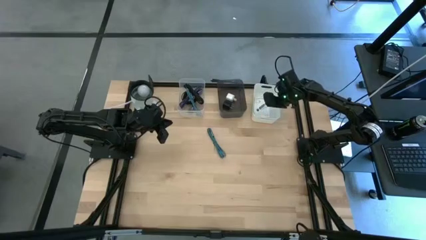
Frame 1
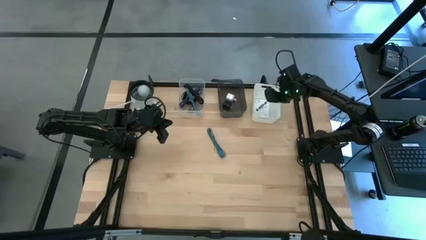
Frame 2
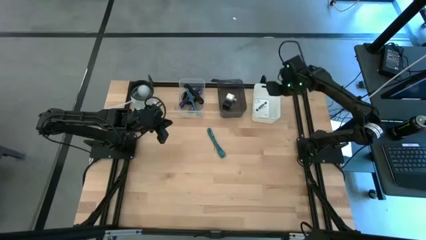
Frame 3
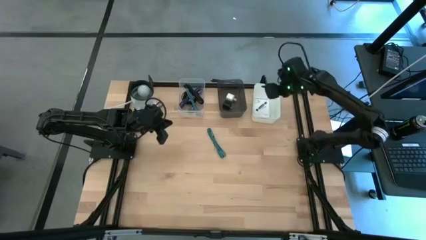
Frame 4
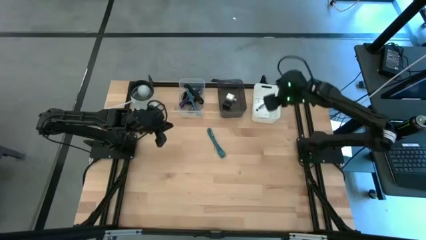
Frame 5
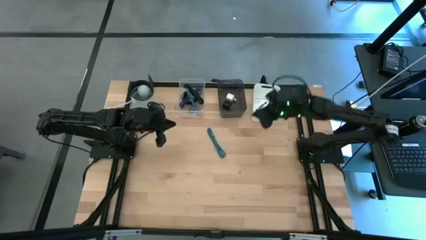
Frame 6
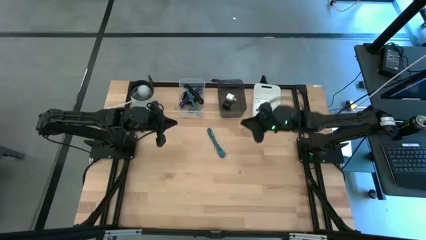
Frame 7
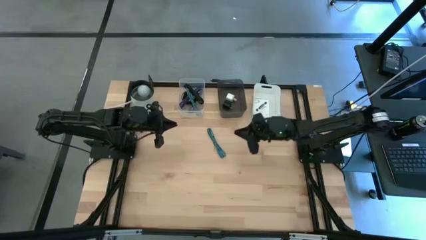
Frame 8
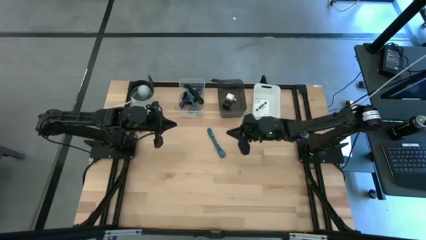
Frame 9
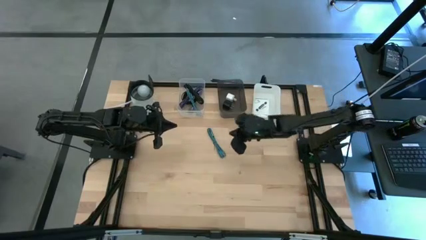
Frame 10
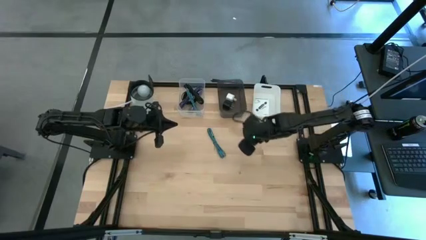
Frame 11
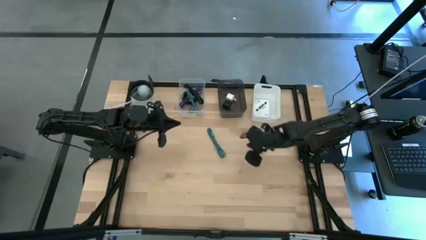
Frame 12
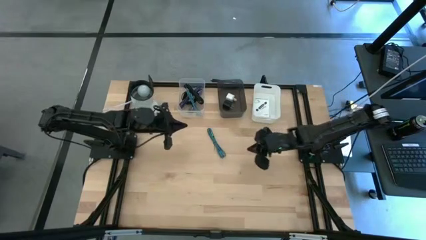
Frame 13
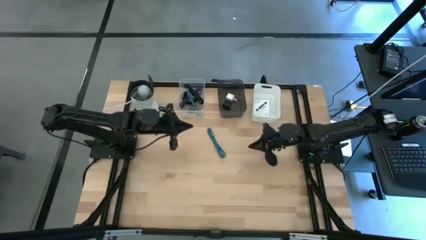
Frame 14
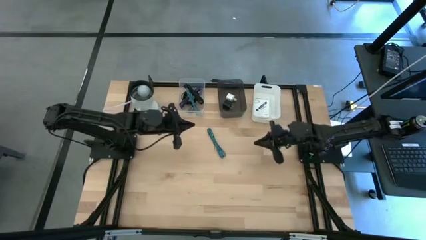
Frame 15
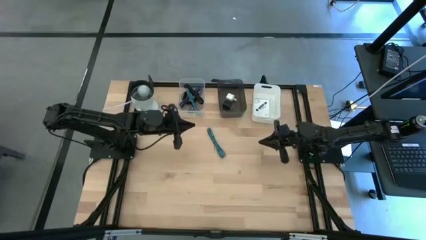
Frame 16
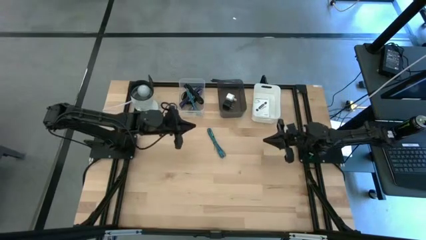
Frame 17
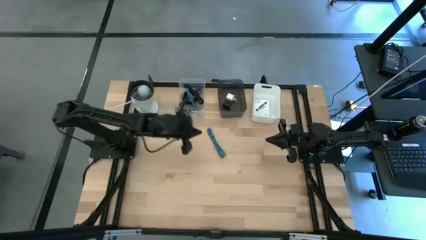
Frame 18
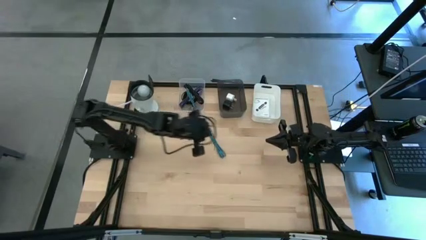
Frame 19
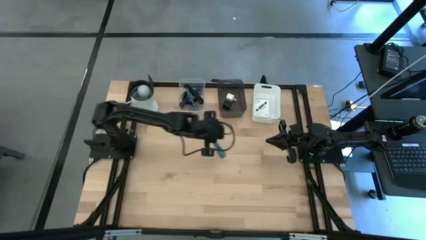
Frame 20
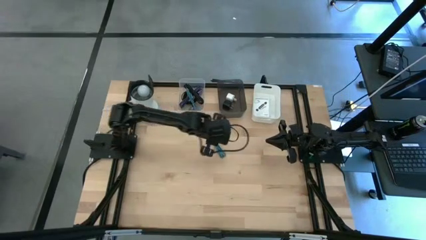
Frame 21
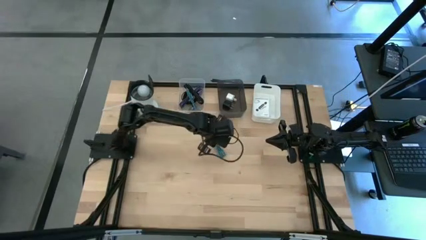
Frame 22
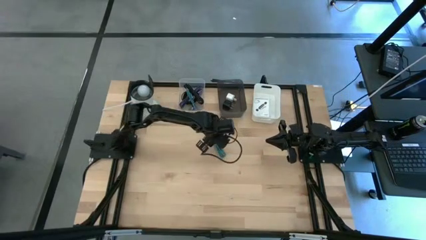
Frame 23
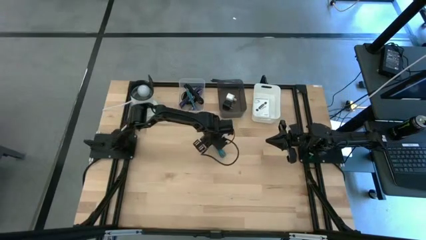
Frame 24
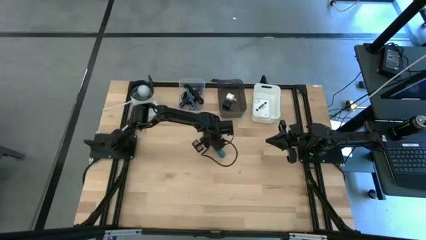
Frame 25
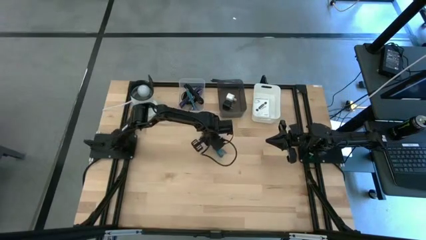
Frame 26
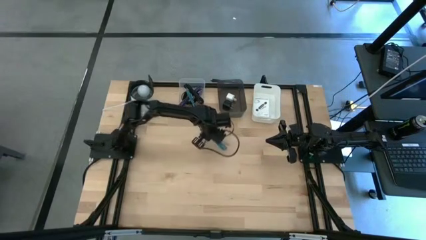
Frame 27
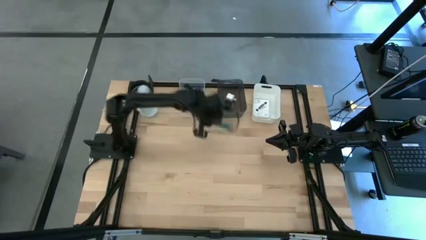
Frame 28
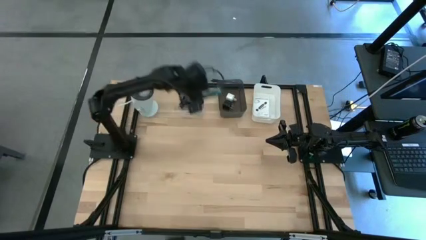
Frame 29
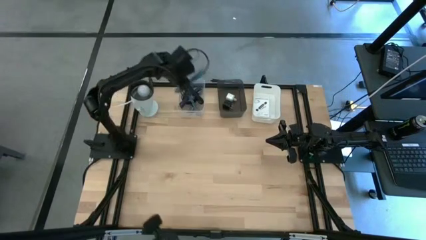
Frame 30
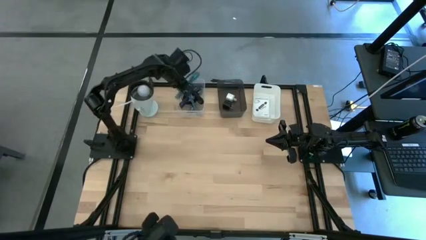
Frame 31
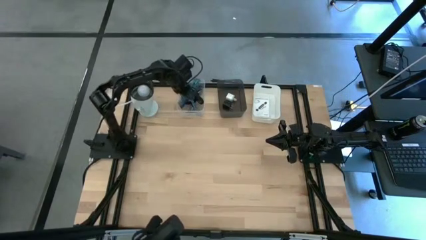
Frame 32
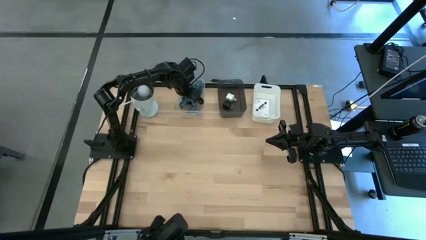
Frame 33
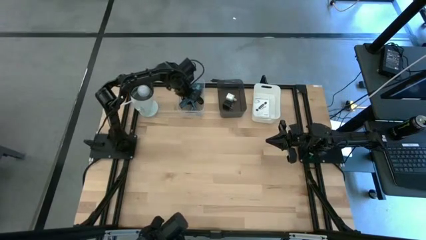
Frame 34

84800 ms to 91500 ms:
Task: Pick and place items into bin
Put the light blue charger cable into the transparent bin

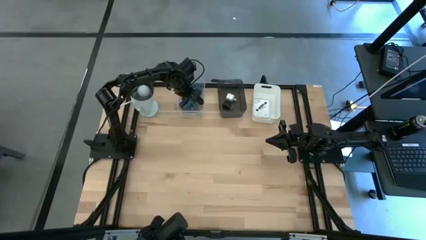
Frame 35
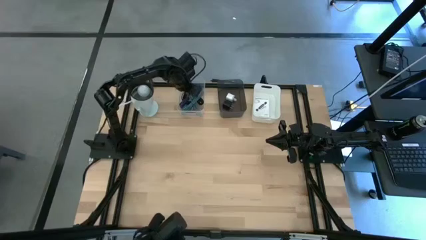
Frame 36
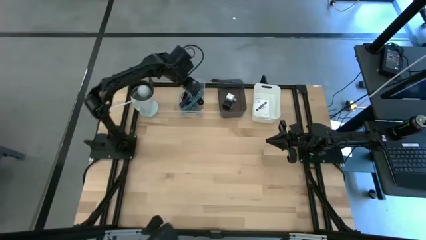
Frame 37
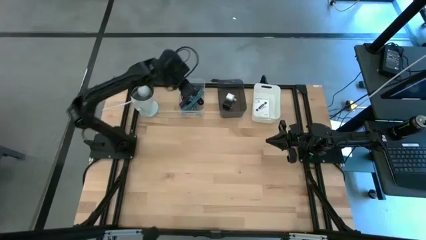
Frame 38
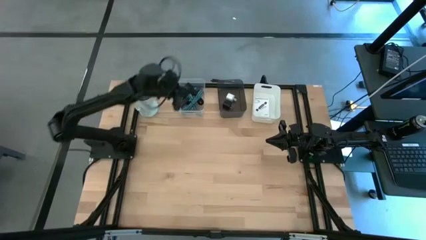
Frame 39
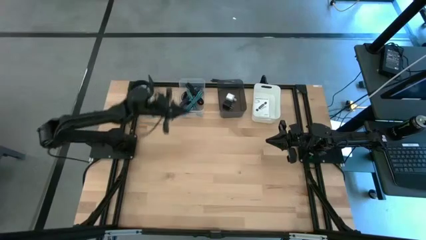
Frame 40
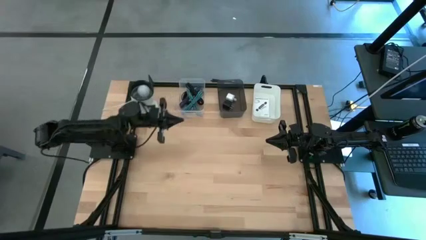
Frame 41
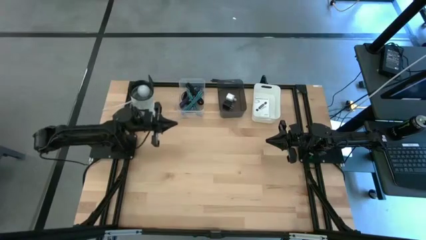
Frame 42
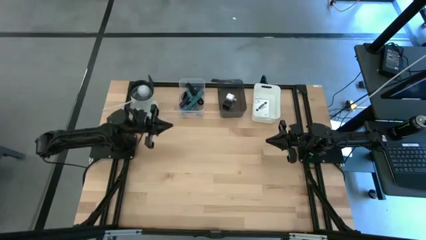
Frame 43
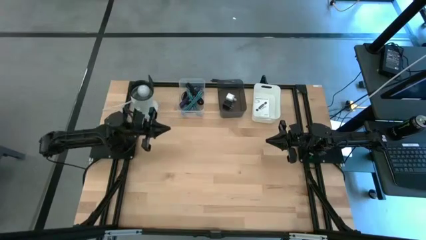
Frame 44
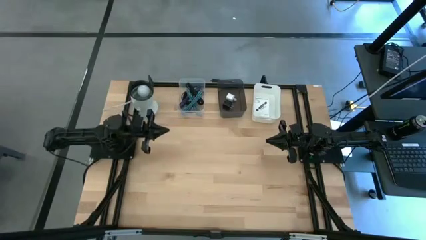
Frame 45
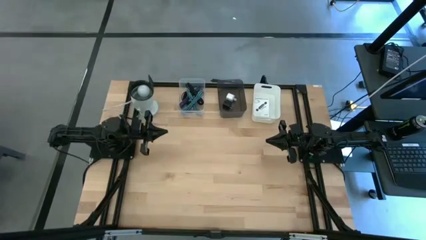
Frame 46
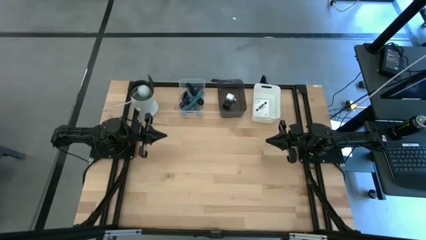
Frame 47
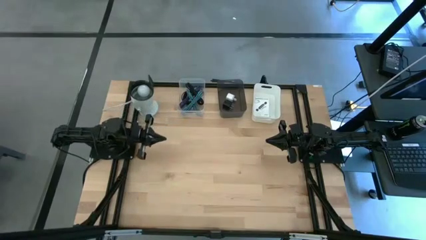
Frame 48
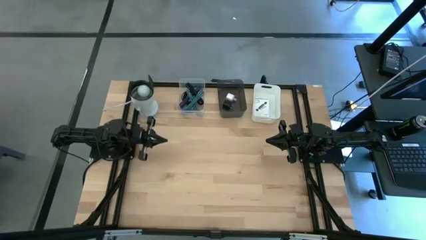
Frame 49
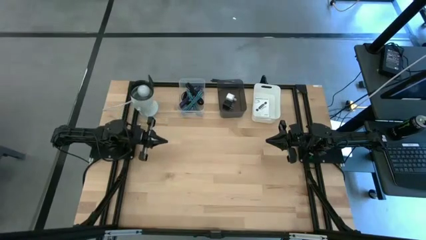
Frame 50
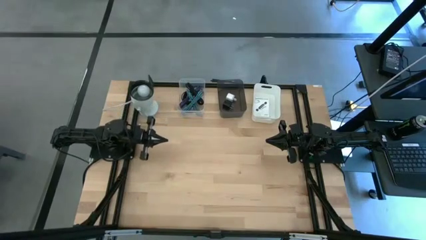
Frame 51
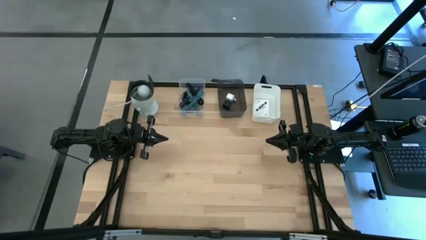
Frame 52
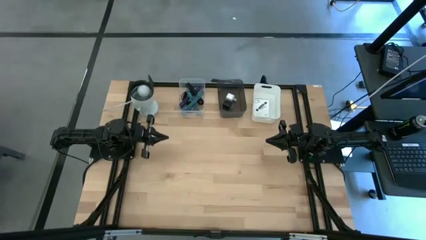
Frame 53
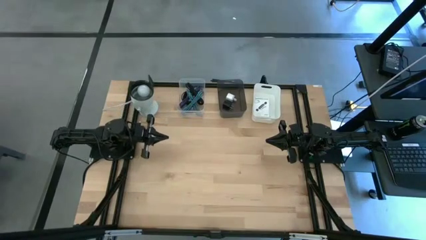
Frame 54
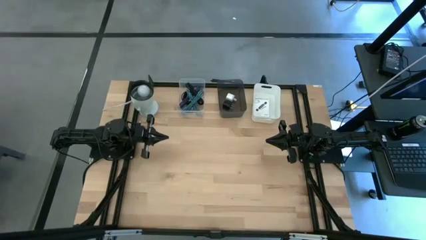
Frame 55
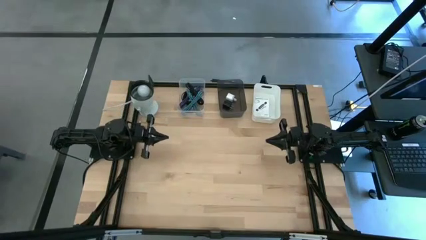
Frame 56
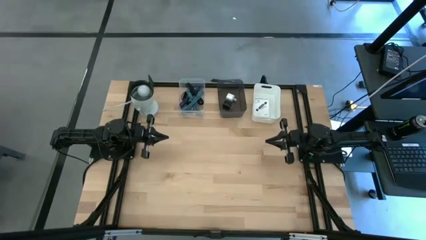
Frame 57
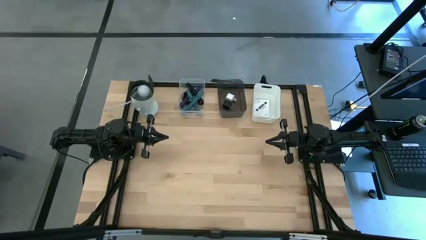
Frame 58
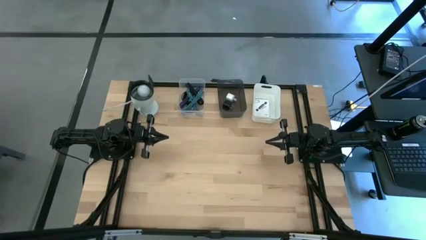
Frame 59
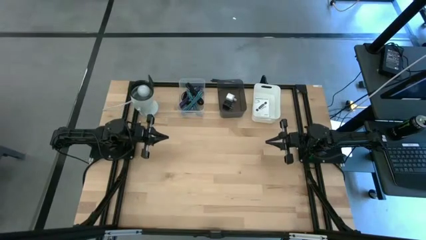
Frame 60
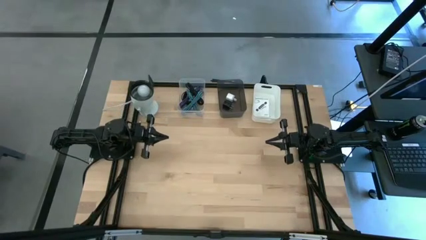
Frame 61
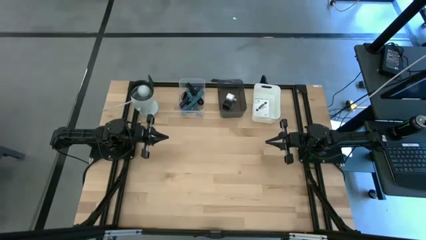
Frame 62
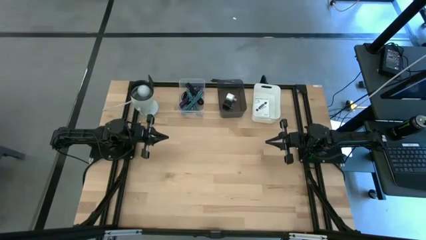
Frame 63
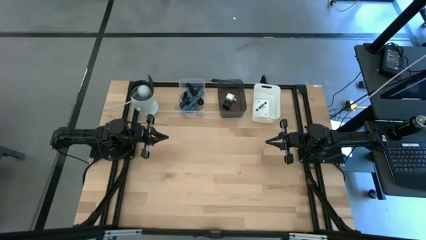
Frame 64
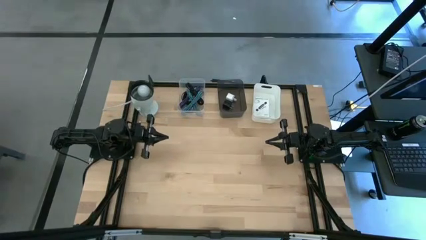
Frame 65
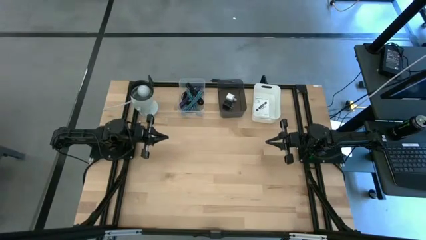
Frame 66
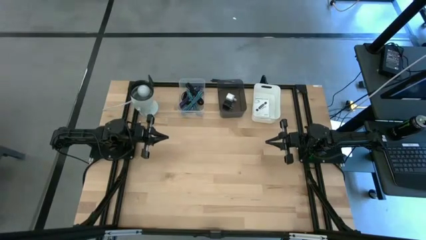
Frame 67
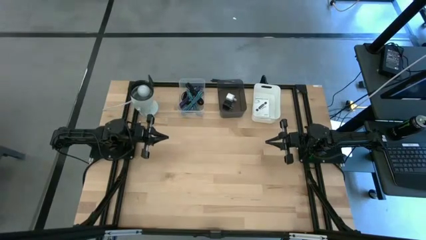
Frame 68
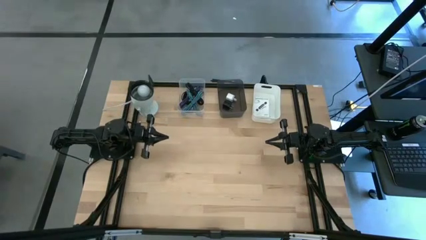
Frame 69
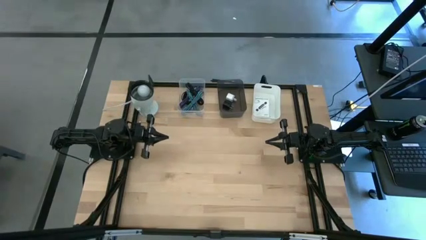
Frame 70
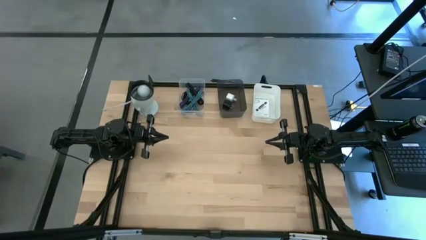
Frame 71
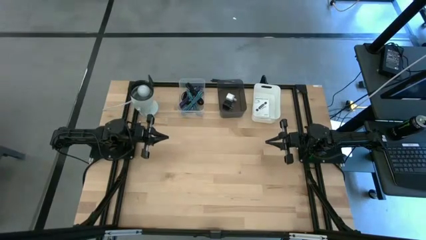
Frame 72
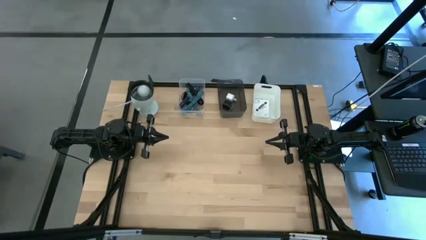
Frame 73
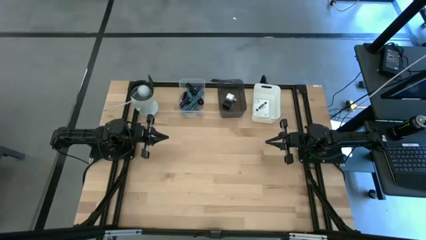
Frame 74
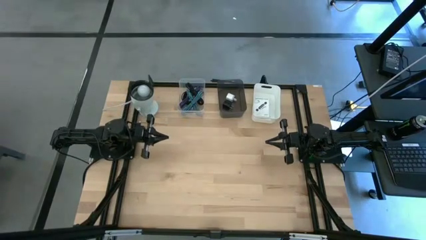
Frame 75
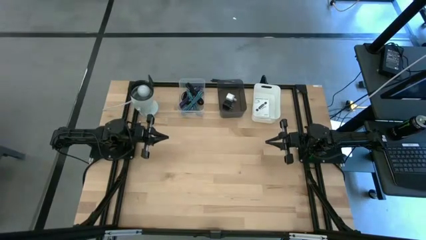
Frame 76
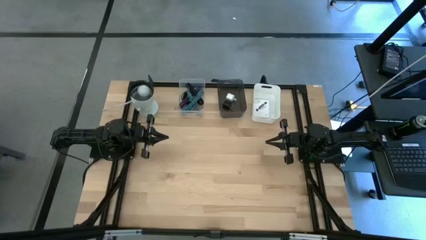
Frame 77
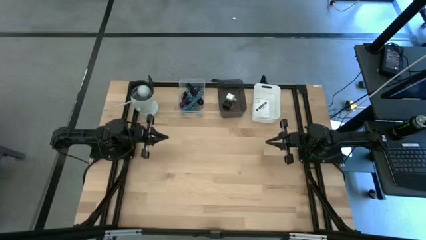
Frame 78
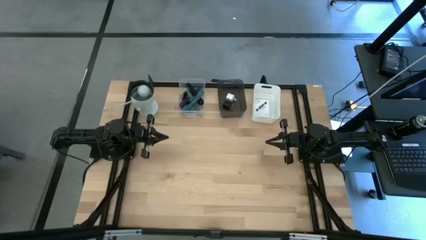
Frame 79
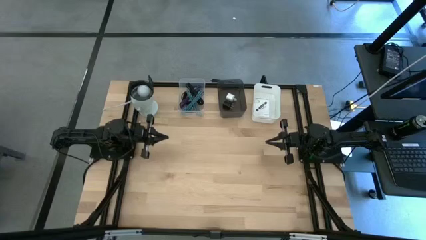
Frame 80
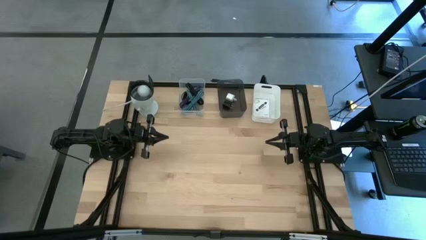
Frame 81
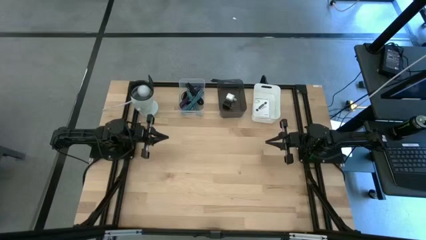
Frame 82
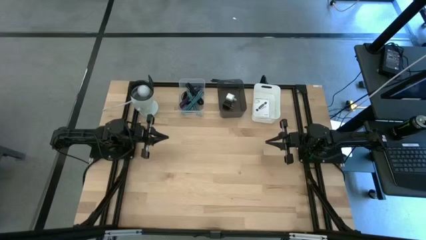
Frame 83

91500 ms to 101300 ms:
Return to Home Position
